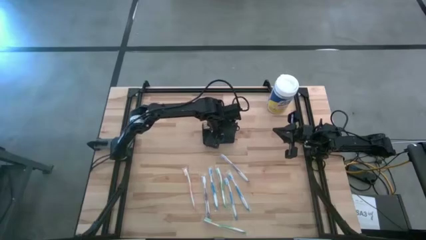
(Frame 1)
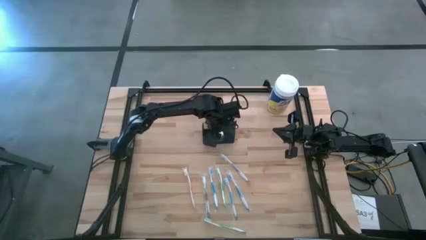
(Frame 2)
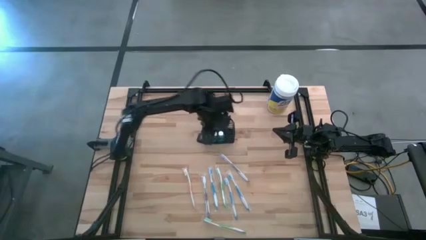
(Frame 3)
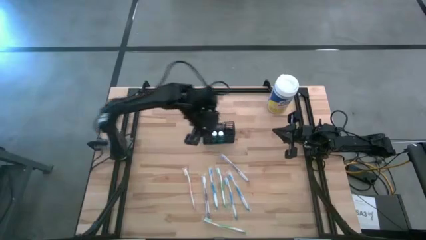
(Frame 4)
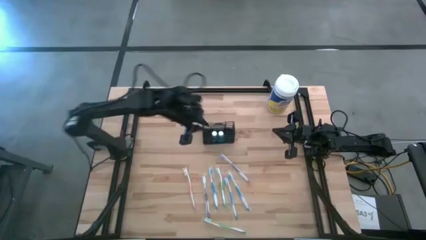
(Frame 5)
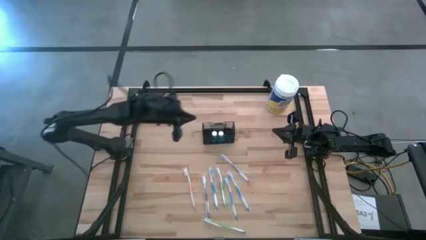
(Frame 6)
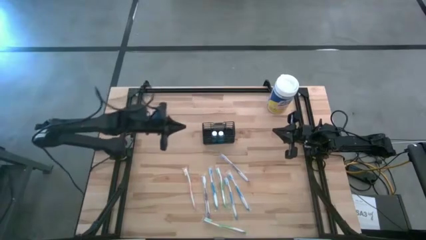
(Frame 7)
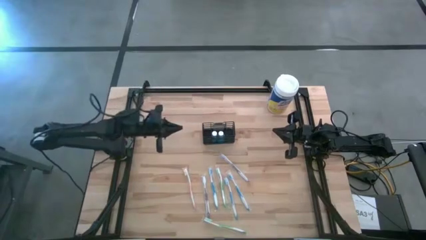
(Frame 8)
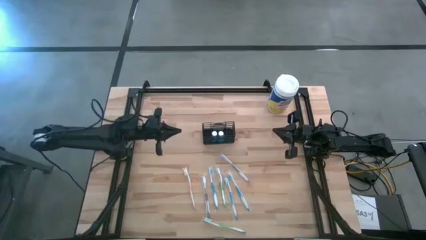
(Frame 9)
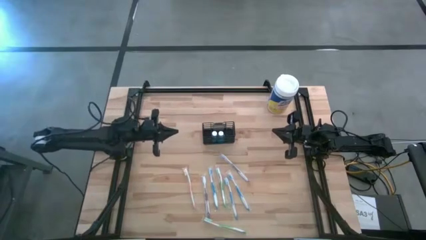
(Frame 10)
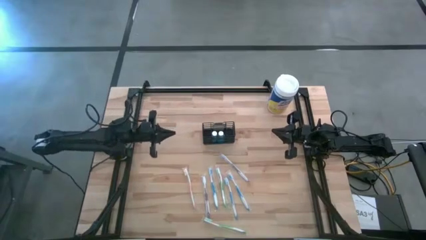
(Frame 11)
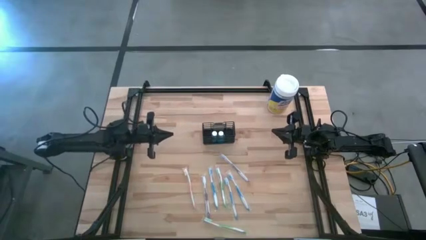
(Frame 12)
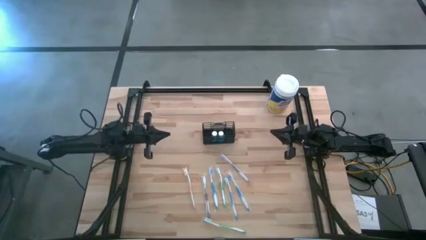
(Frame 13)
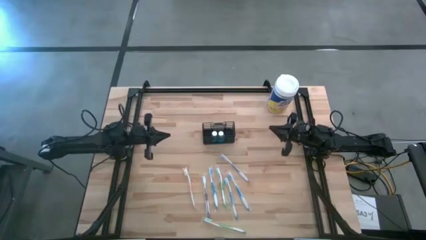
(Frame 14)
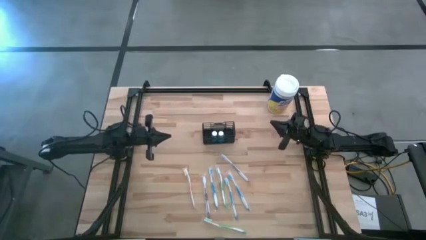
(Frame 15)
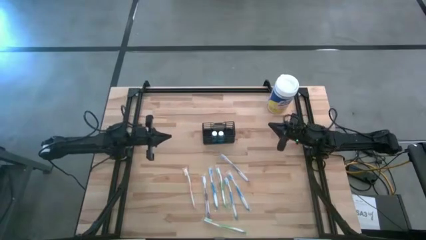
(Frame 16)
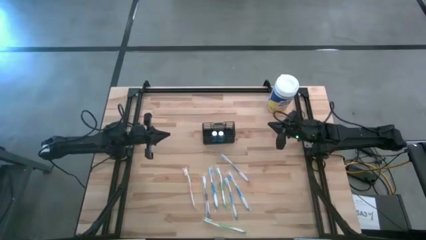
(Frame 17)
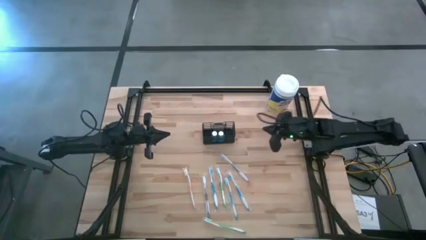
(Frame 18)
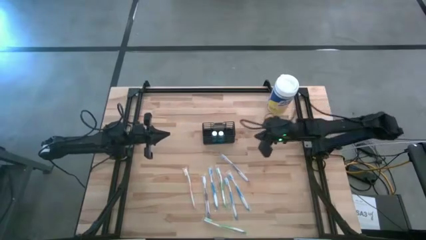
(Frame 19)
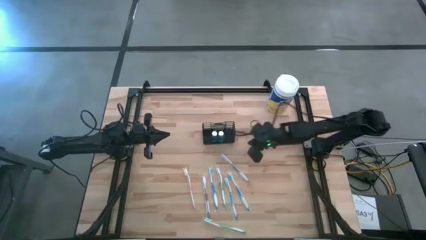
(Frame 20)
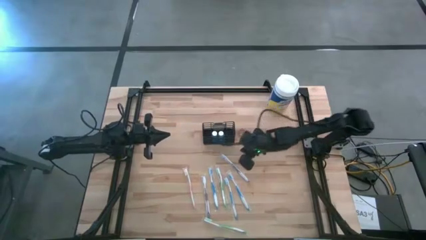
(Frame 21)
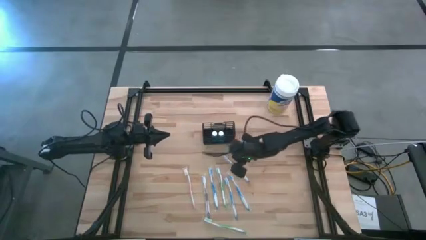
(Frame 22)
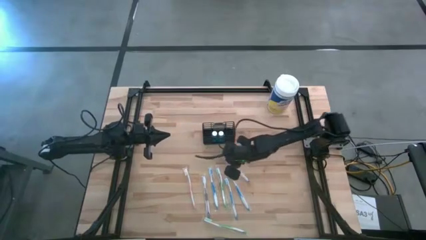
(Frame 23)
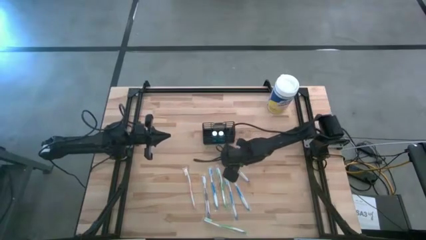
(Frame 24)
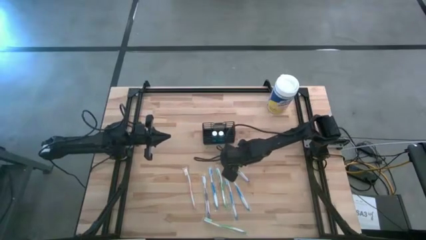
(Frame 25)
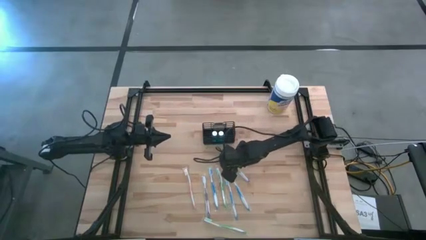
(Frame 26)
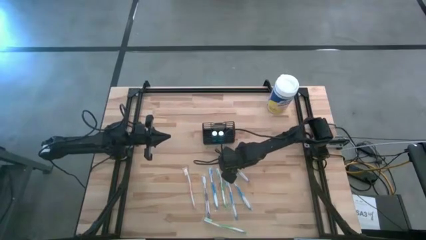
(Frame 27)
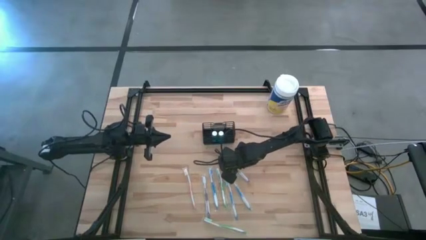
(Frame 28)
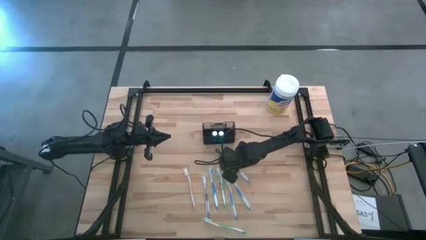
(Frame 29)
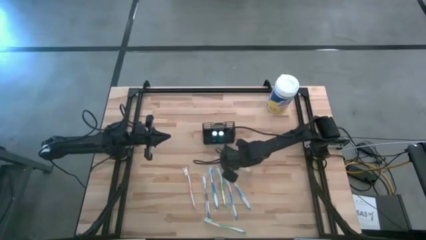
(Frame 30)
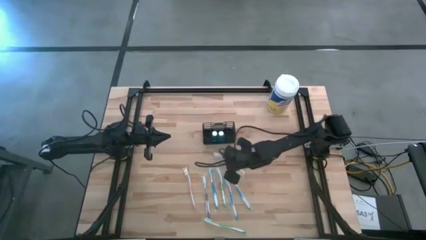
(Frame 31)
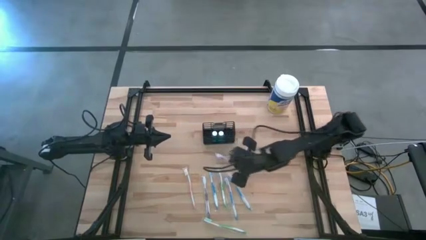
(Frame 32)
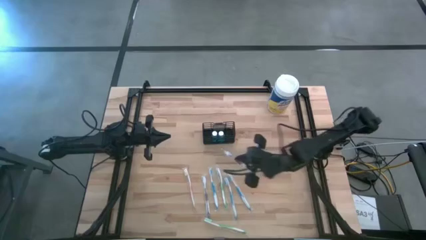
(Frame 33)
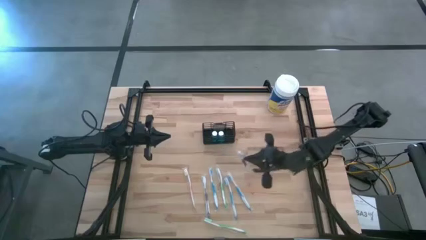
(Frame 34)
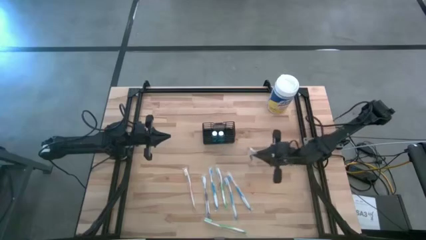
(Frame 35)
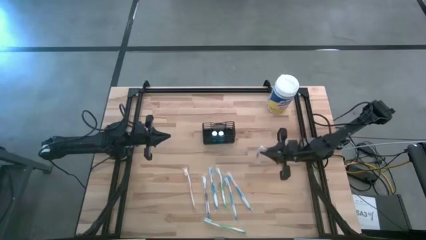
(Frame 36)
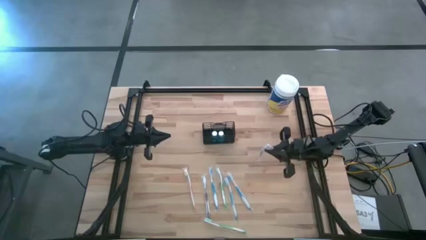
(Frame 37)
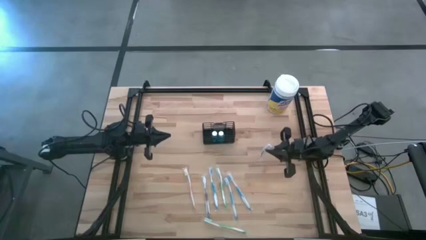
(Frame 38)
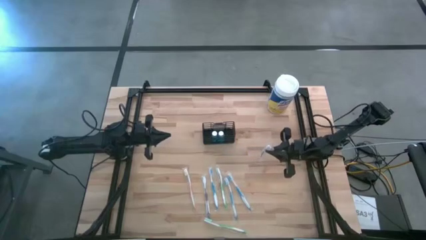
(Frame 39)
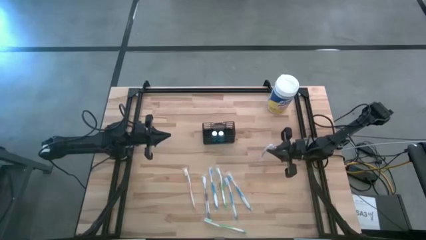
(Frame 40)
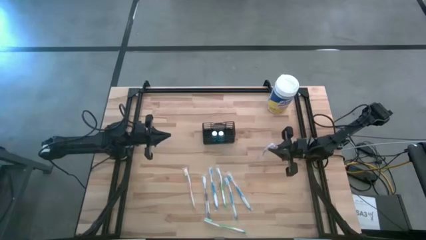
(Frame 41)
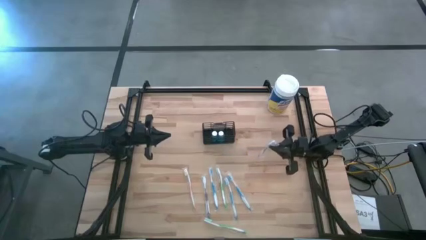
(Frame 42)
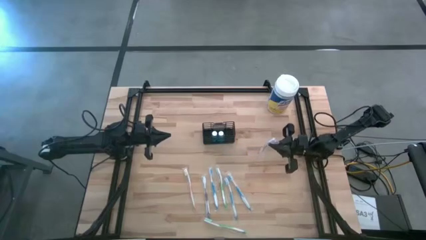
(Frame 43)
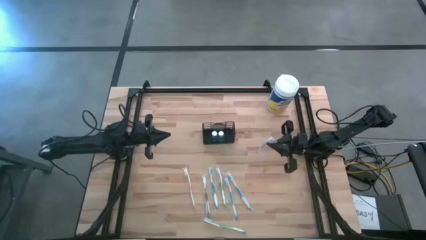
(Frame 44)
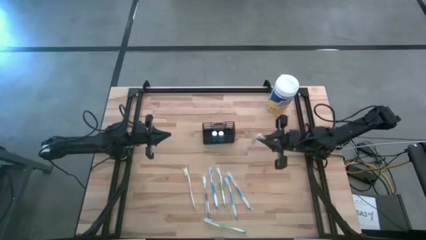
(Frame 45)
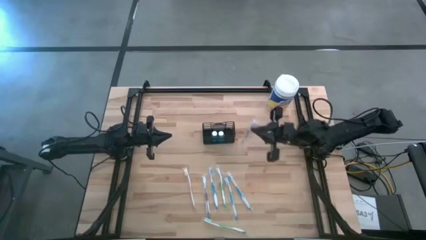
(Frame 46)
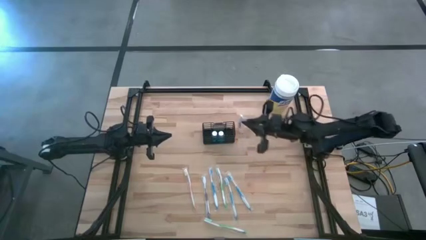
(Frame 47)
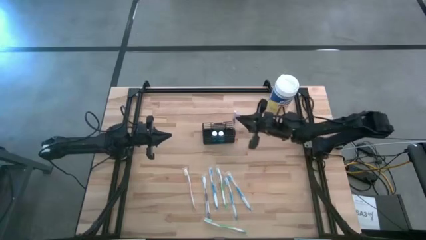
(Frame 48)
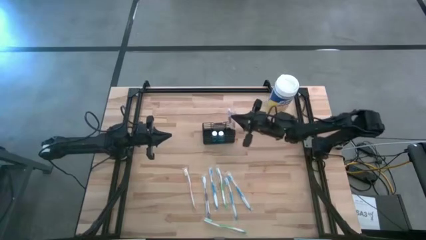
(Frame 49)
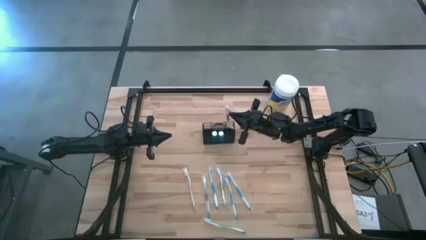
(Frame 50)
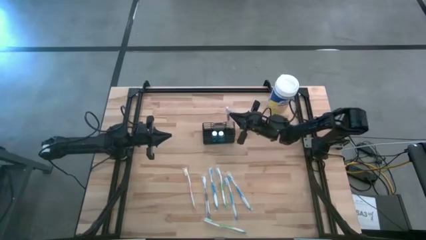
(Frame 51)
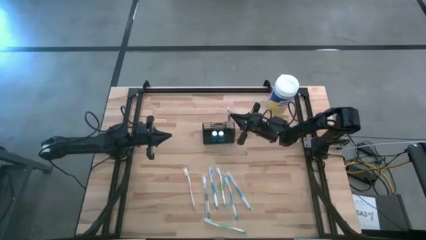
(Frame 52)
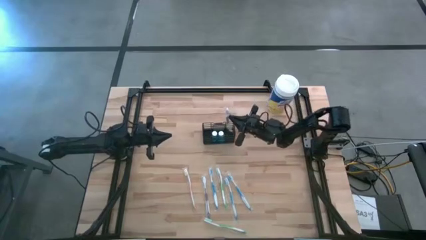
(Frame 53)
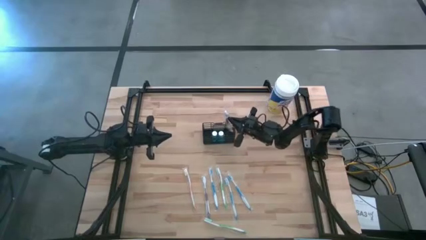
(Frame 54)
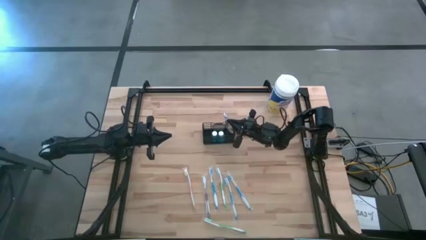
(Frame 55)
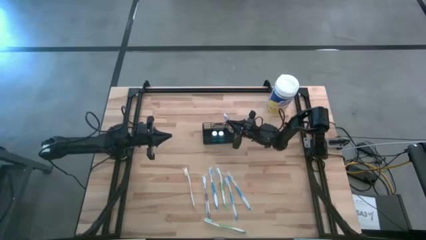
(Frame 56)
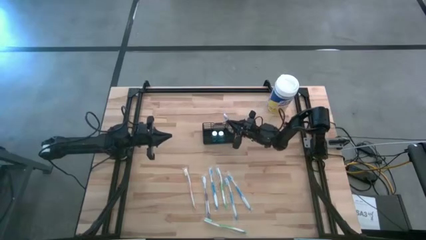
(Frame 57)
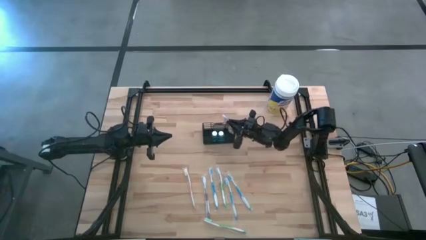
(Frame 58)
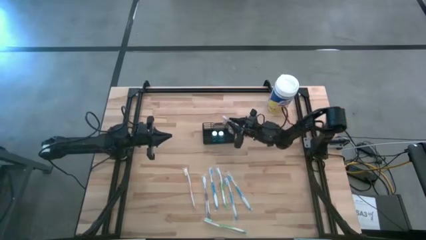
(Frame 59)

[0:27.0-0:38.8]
Task: Pick & Place toothbrushing station
Put the right violet toothbrush into the mesh organizer
